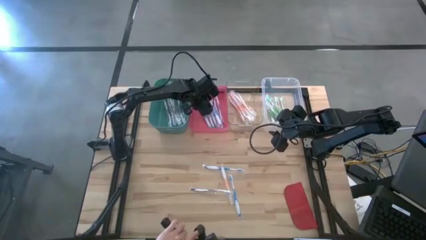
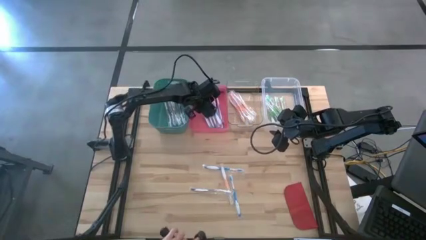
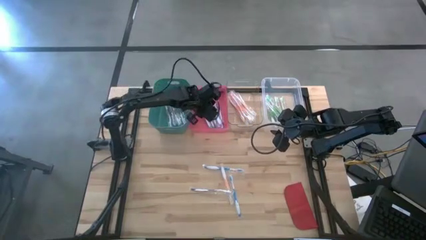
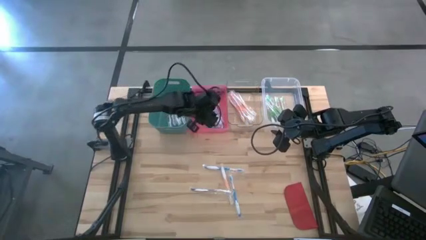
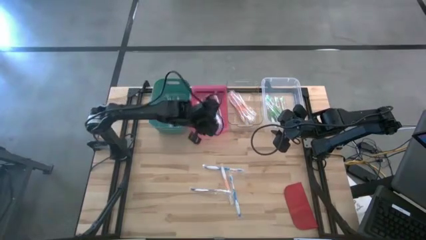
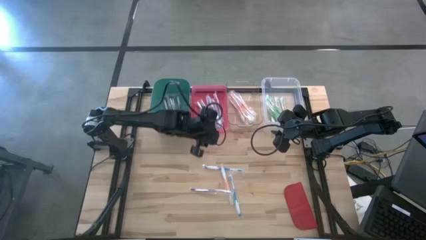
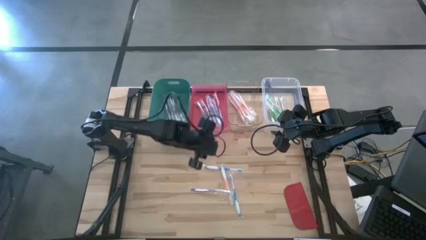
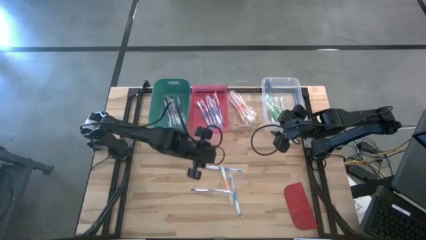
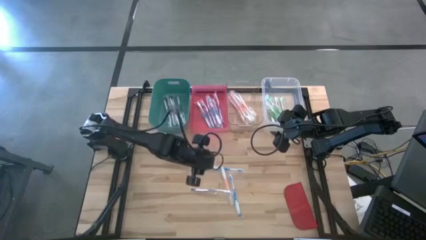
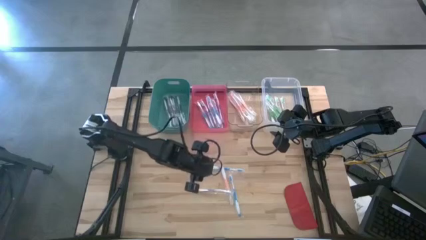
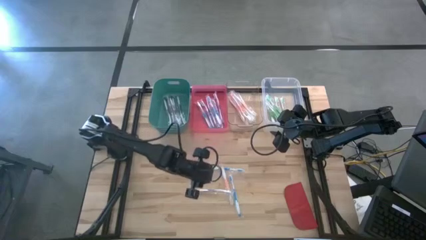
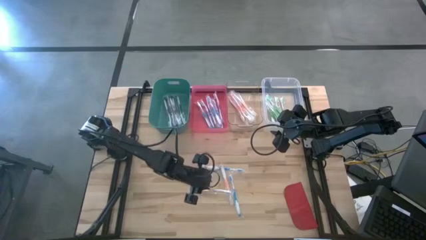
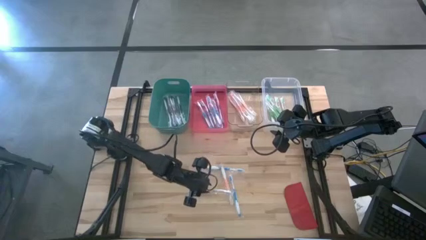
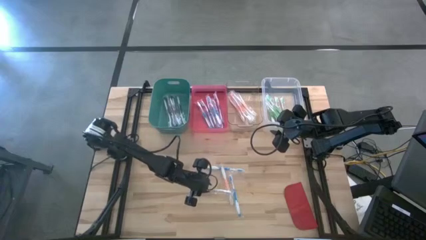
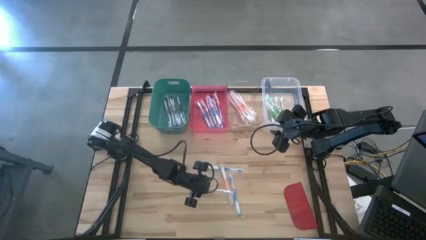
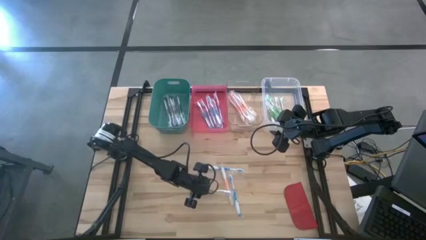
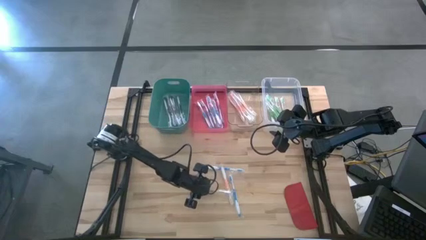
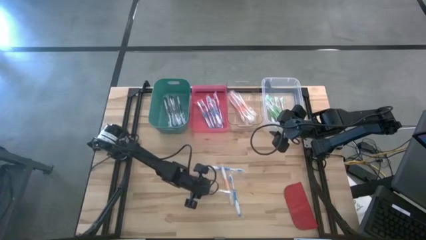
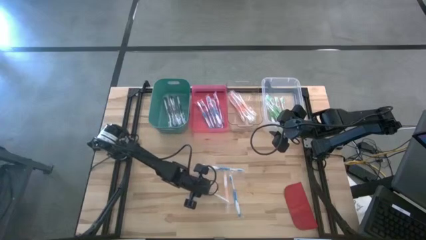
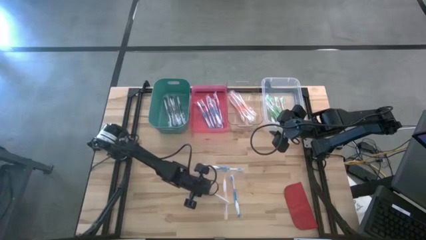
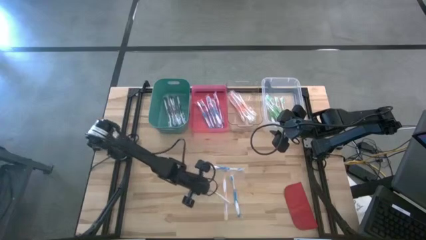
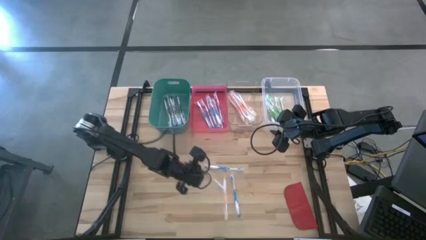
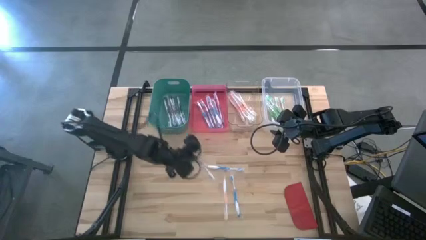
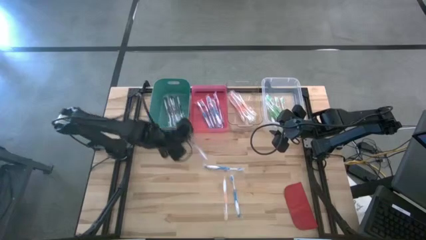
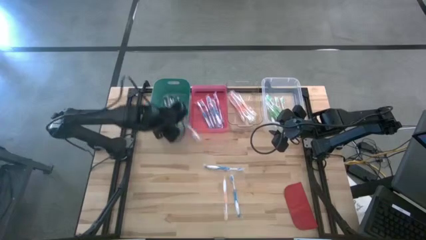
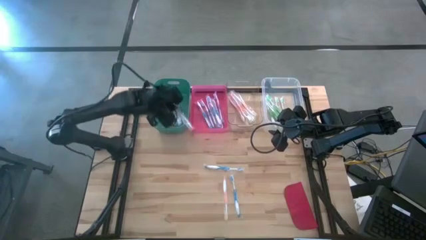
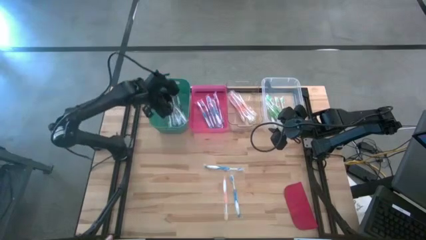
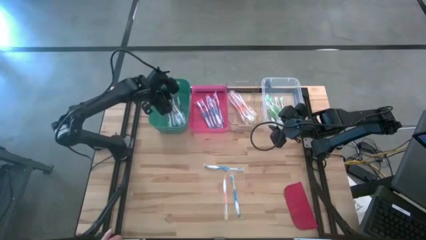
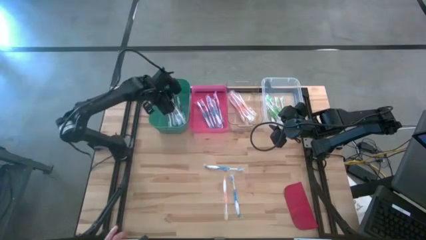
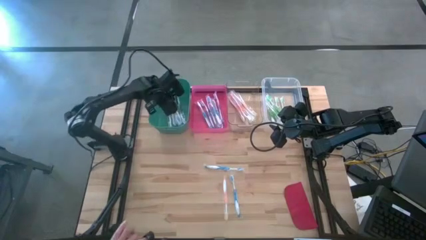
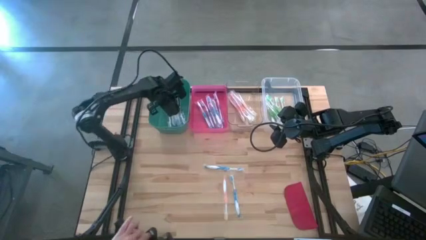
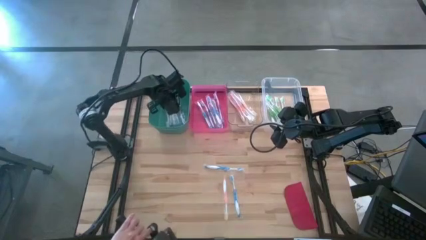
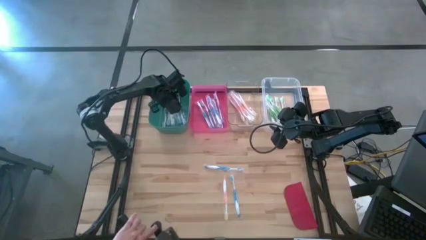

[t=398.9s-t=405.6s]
Task: Pick & Place Toothbrushes
Put the violet toothbrush into the green bin

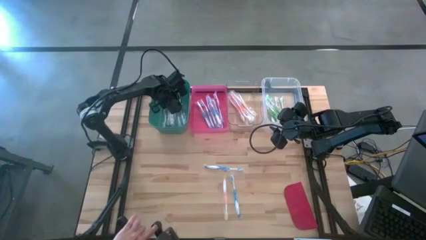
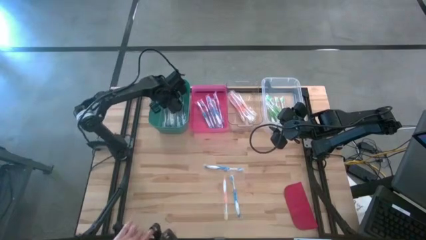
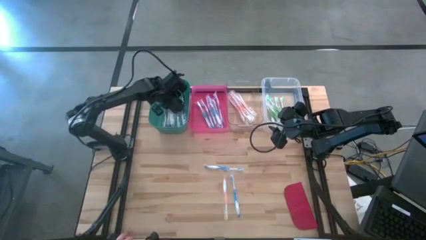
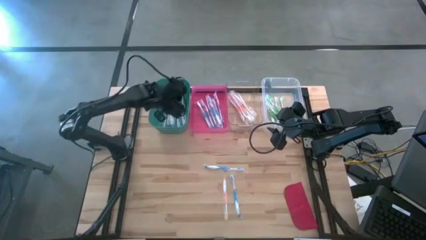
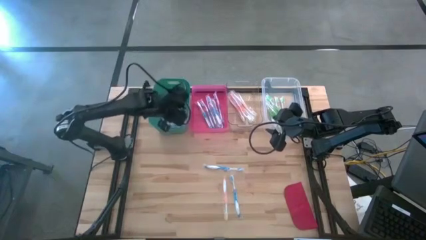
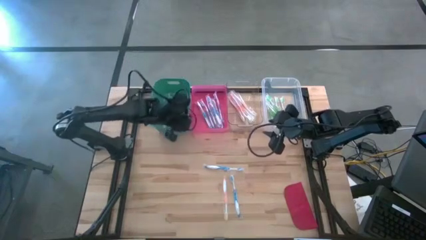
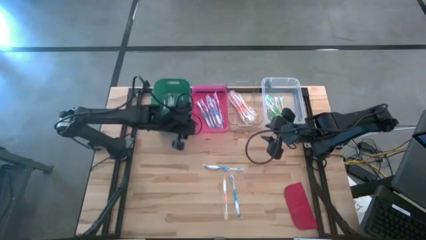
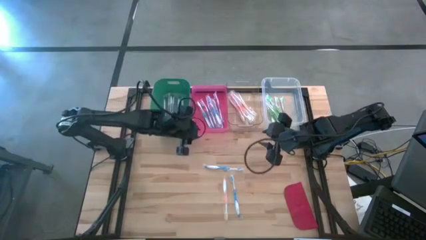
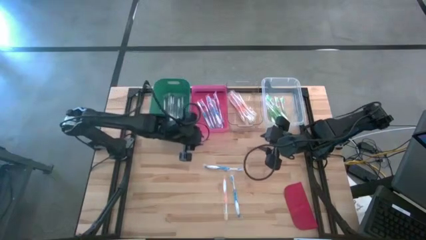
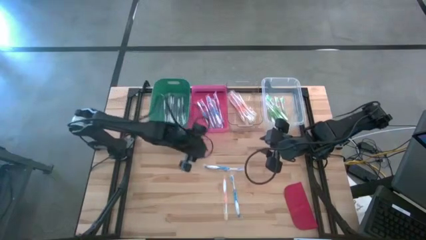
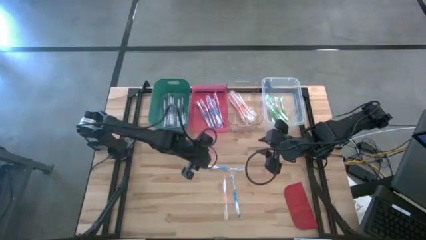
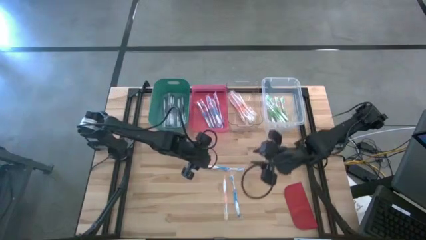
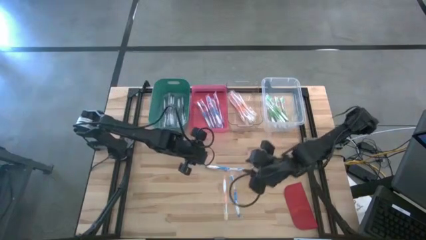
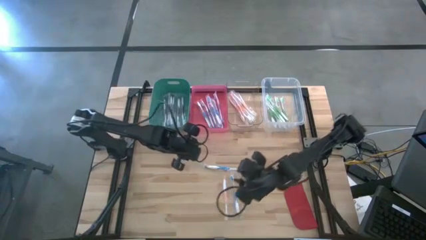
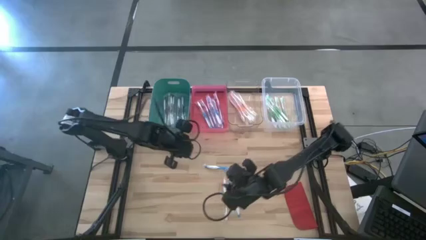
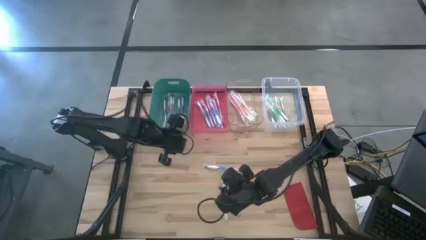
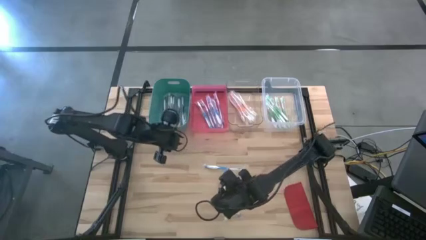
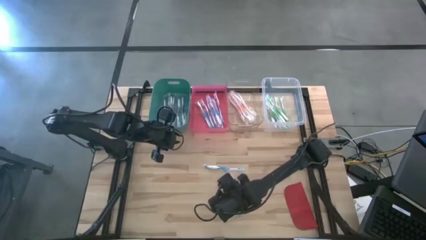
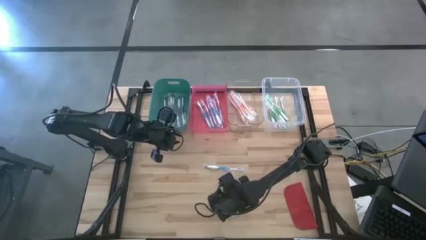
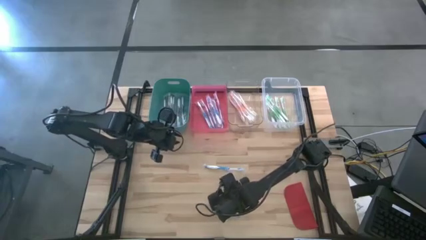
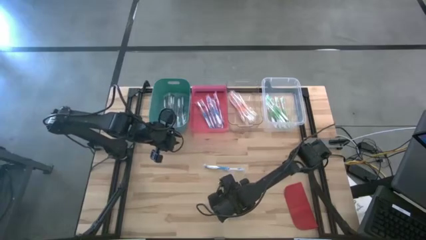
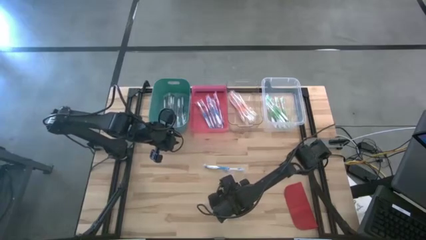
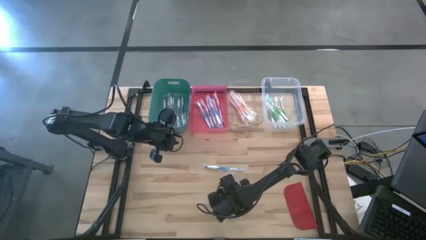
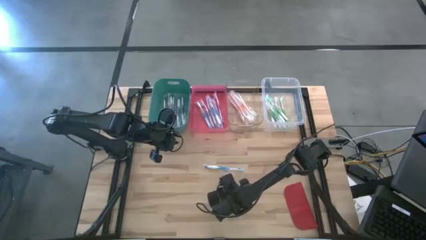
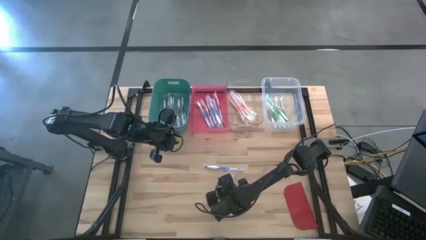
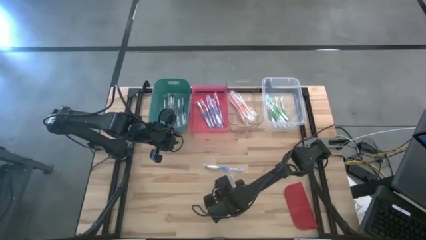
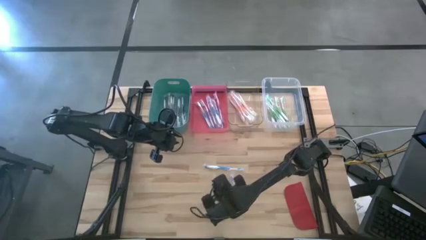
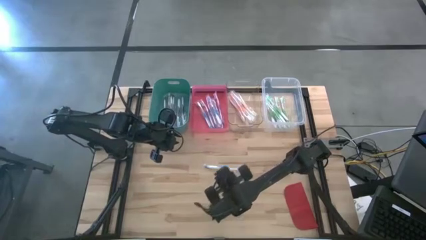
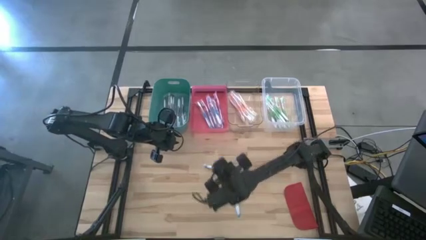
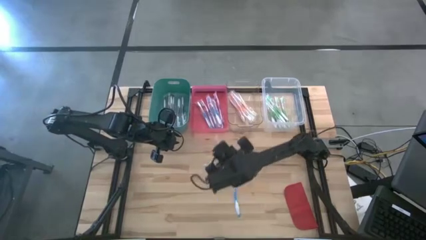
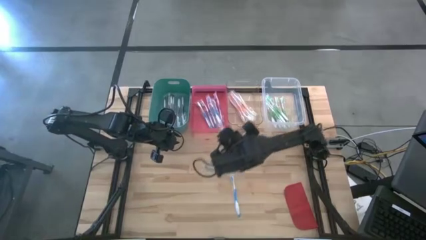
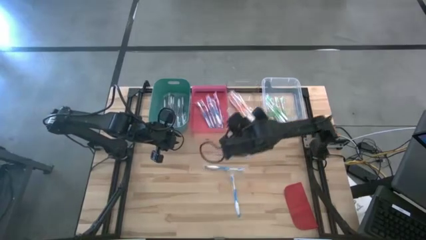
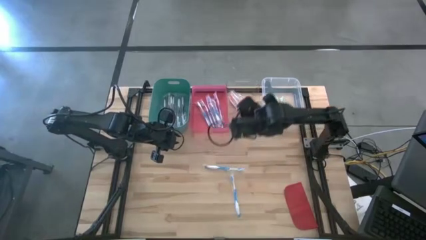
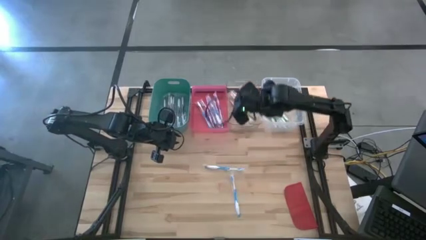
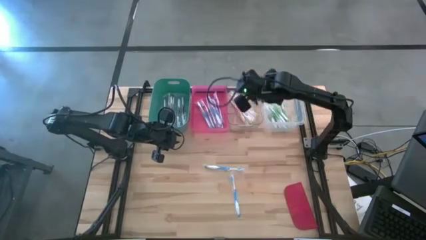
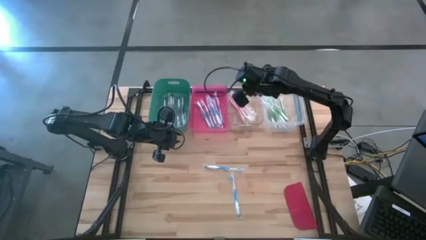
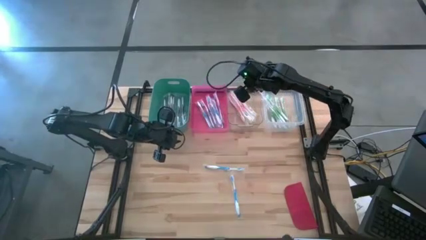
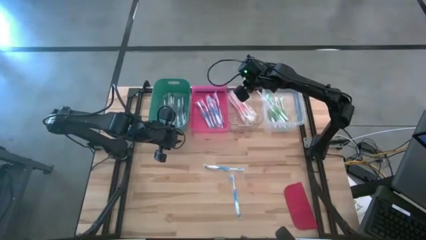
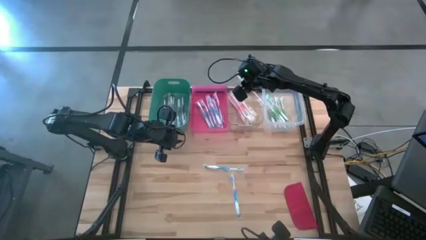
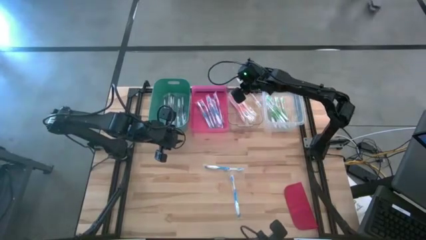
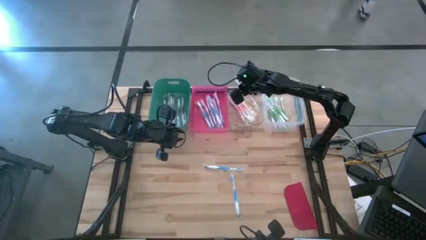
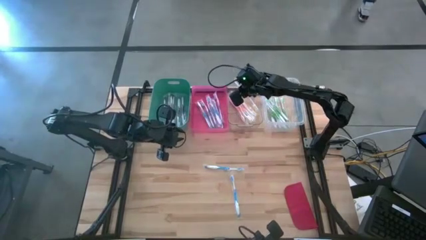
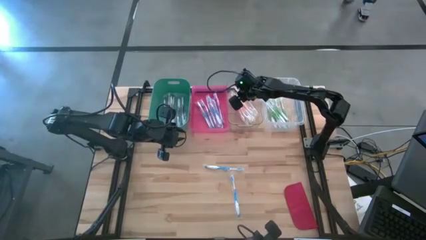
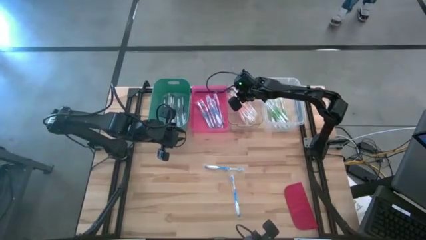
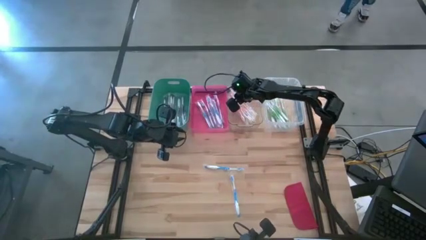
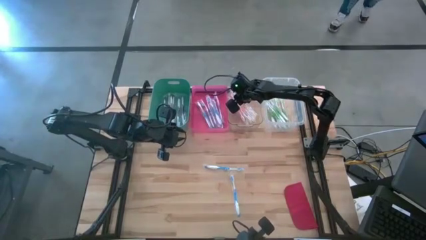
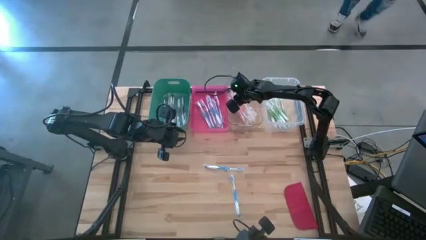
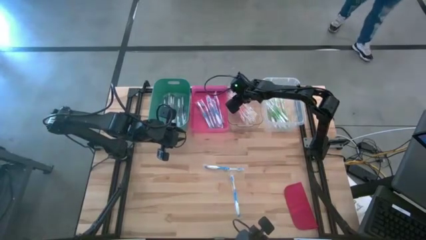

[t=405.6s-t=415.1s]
Put the orange toothbrush into the transparent bin

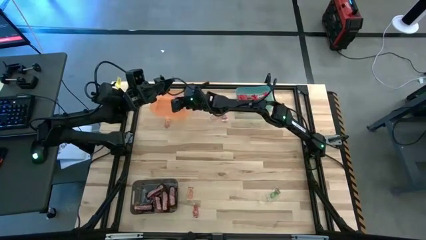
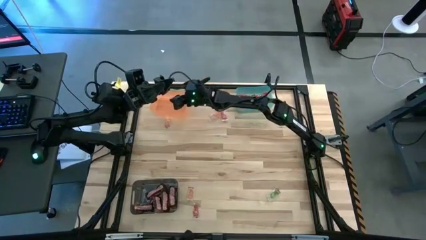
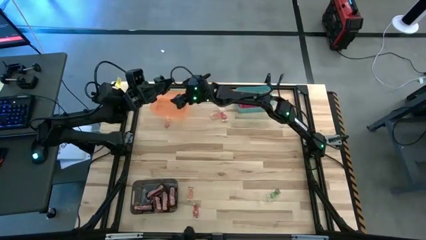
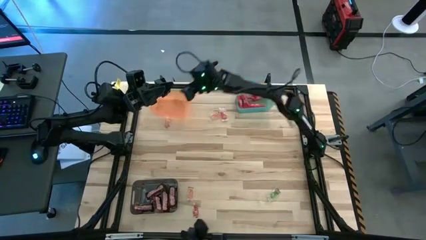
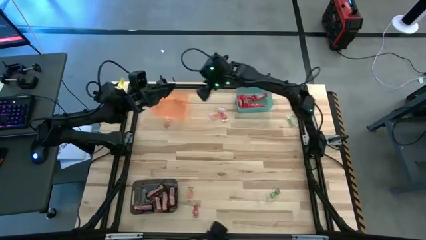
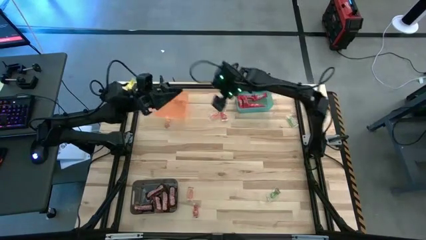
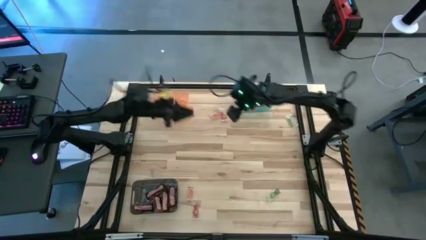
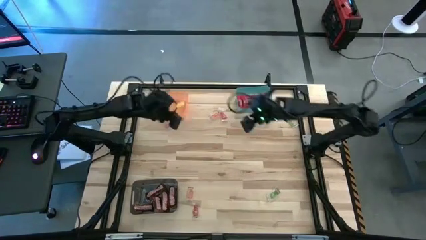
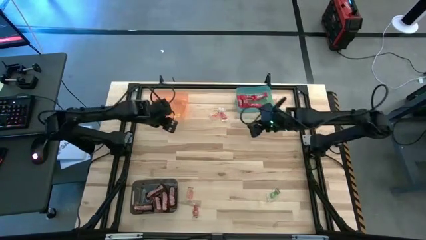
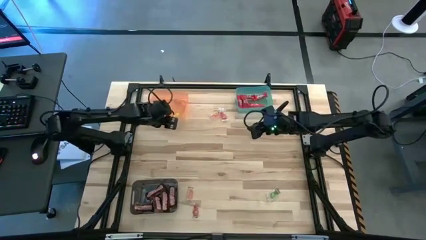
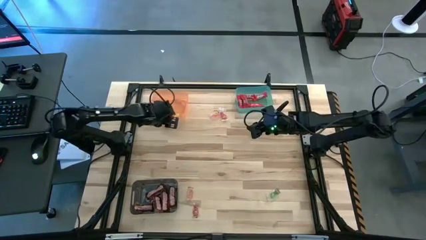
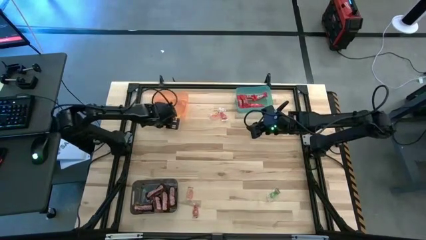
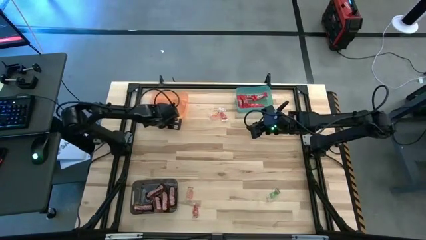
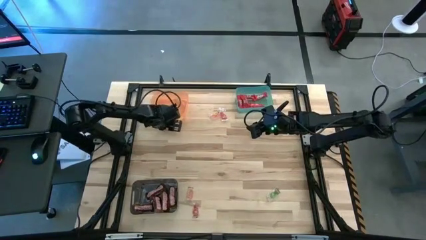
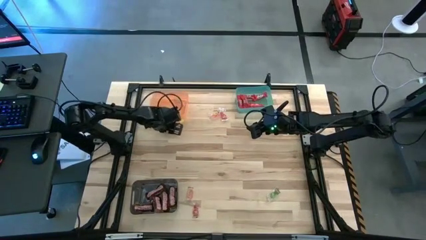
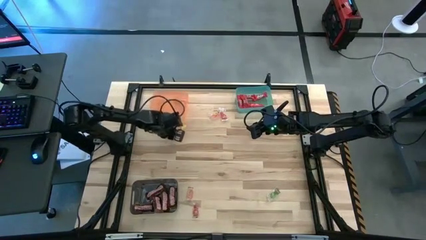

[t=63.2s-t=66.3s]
Task: Sort candy by brand, put in halloween buckets
Put the orange gummy into the orange bin
